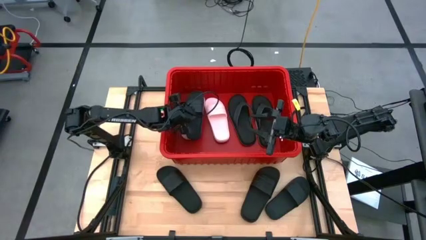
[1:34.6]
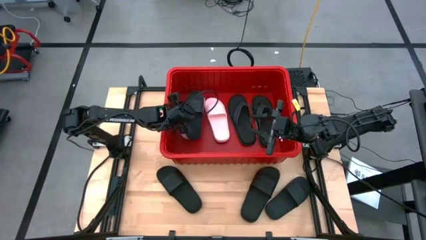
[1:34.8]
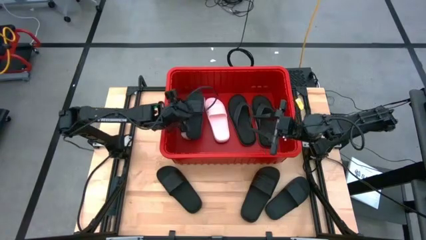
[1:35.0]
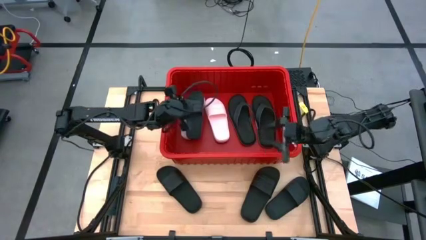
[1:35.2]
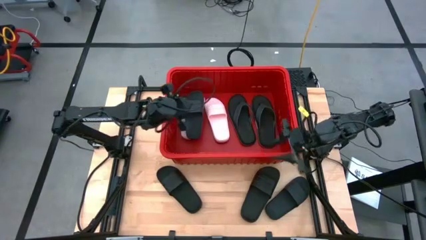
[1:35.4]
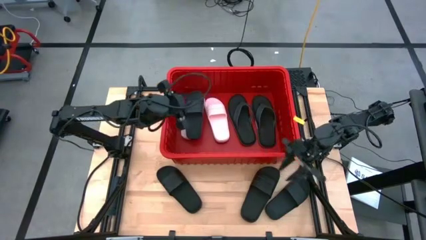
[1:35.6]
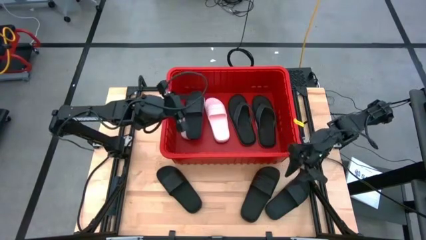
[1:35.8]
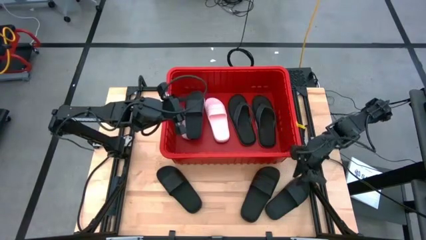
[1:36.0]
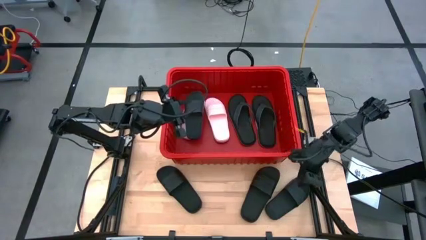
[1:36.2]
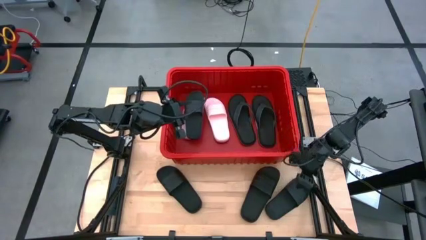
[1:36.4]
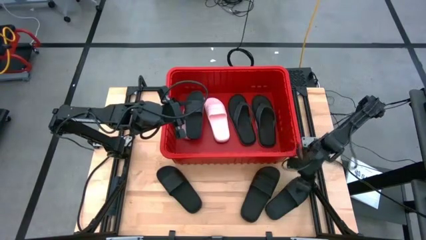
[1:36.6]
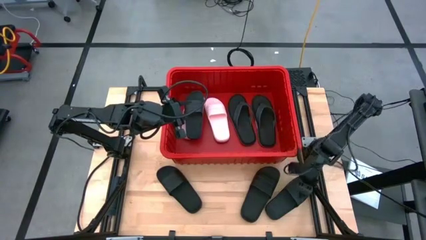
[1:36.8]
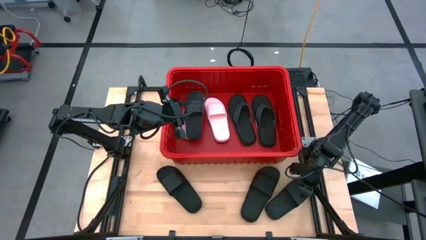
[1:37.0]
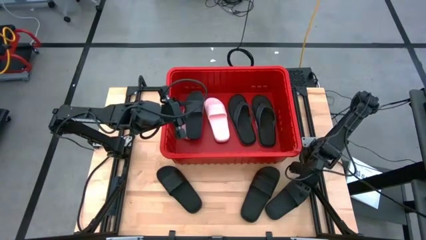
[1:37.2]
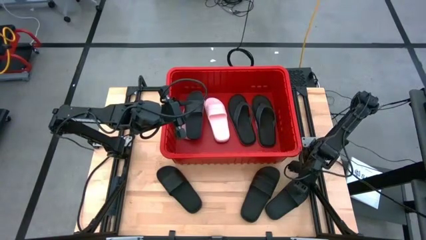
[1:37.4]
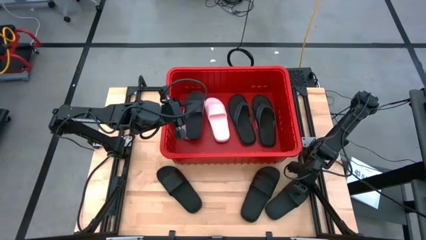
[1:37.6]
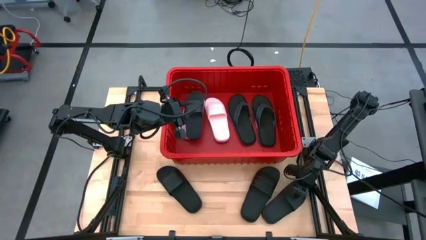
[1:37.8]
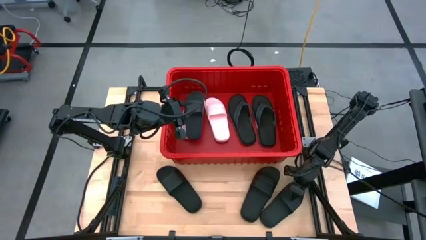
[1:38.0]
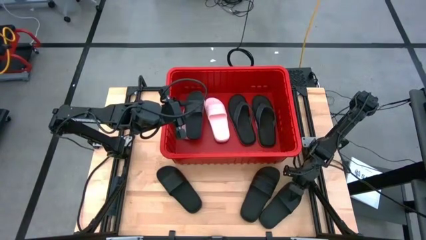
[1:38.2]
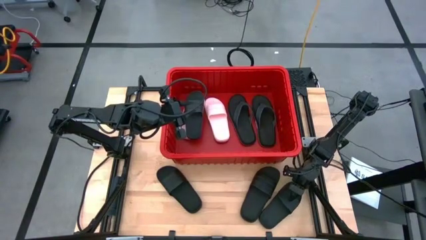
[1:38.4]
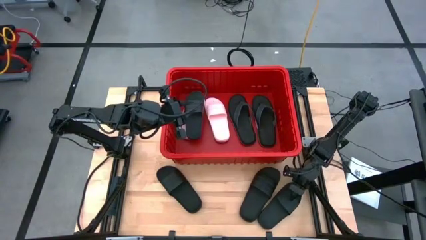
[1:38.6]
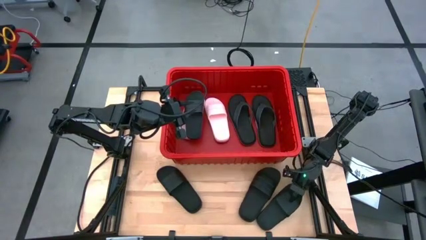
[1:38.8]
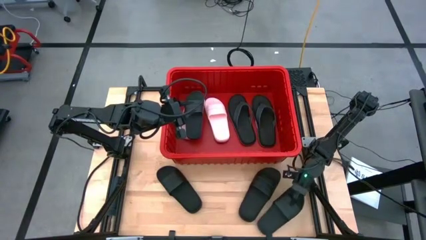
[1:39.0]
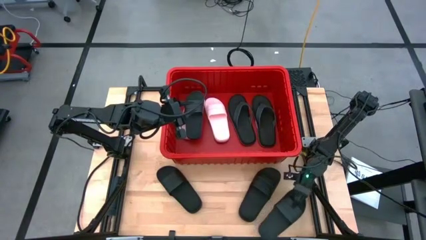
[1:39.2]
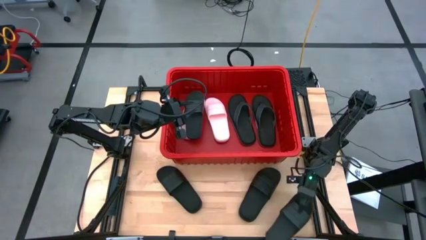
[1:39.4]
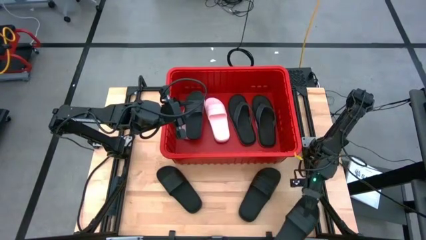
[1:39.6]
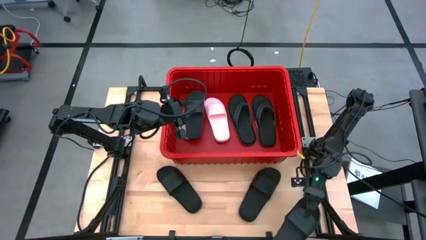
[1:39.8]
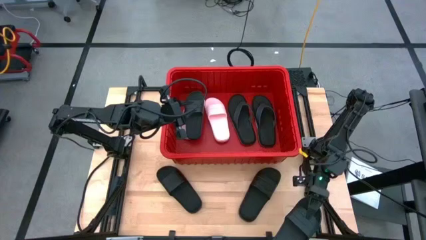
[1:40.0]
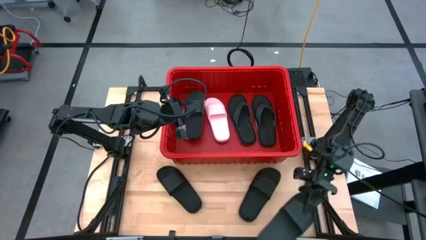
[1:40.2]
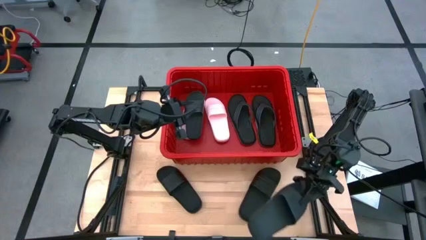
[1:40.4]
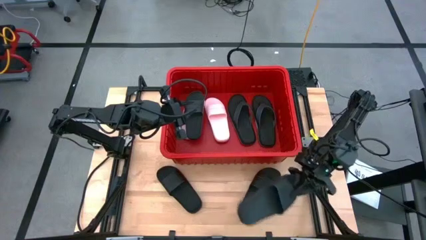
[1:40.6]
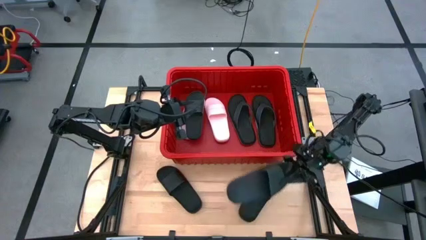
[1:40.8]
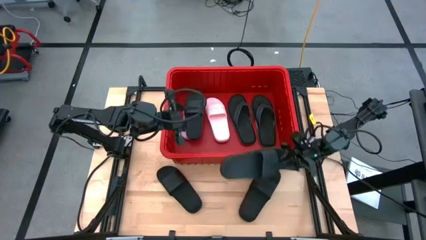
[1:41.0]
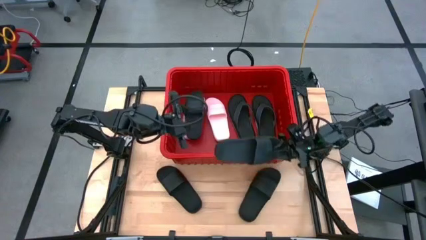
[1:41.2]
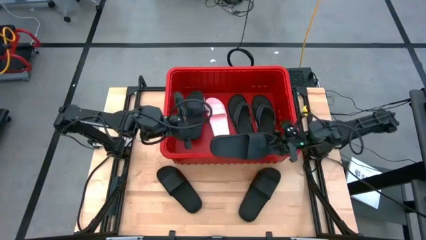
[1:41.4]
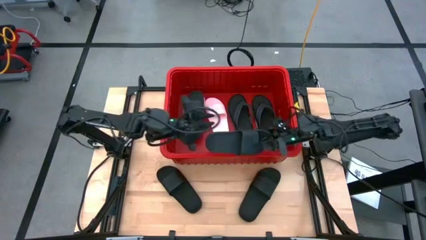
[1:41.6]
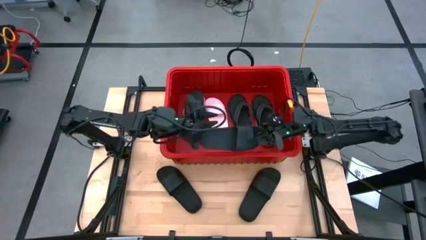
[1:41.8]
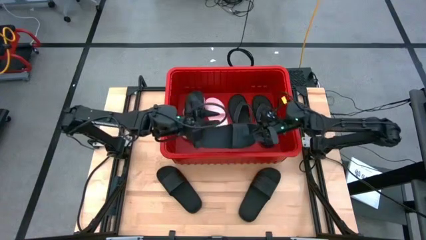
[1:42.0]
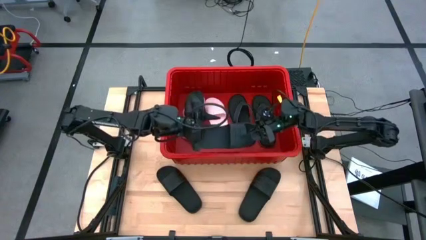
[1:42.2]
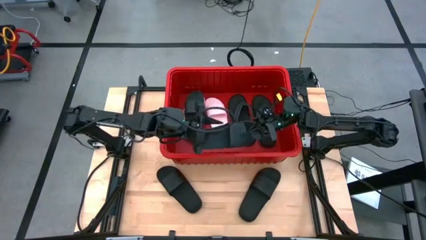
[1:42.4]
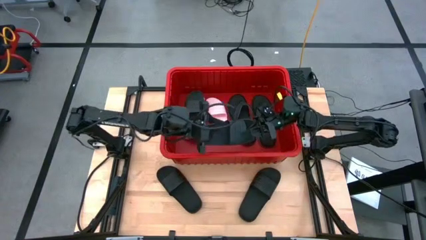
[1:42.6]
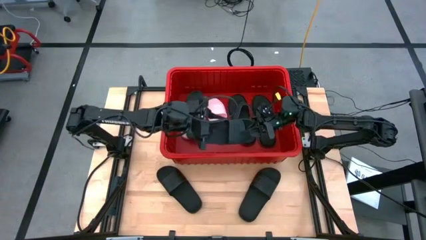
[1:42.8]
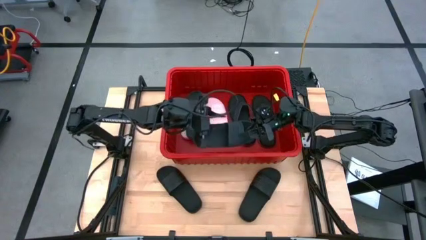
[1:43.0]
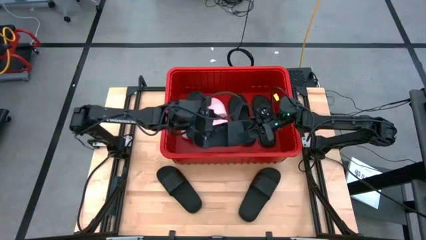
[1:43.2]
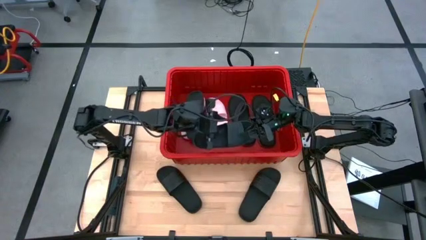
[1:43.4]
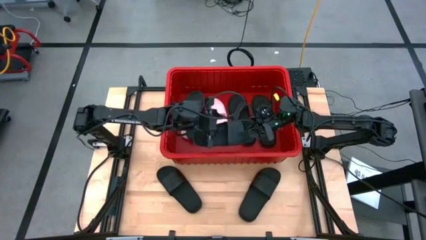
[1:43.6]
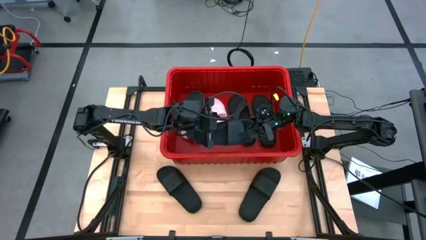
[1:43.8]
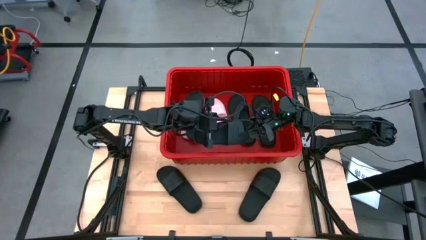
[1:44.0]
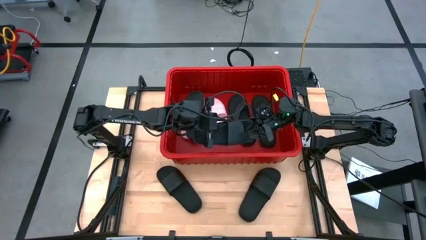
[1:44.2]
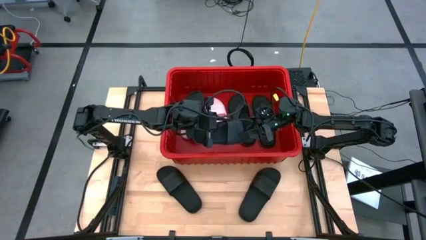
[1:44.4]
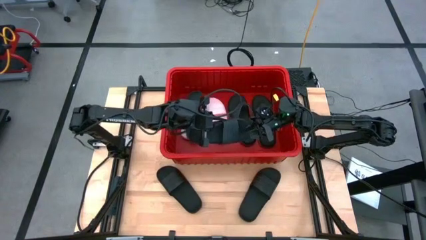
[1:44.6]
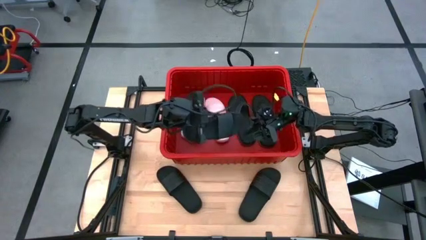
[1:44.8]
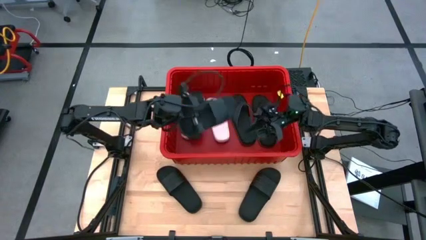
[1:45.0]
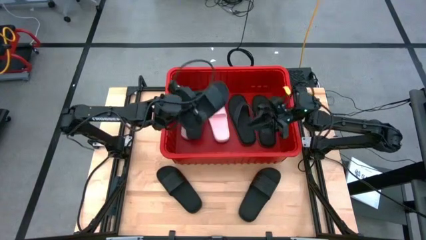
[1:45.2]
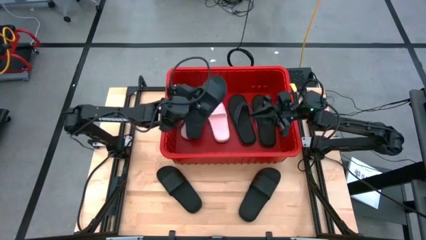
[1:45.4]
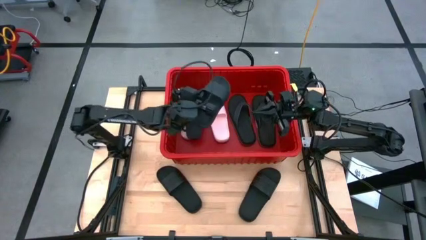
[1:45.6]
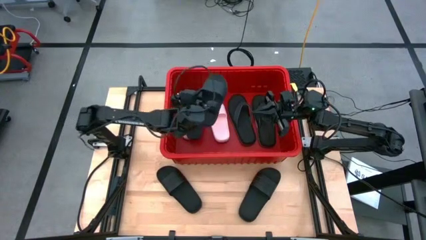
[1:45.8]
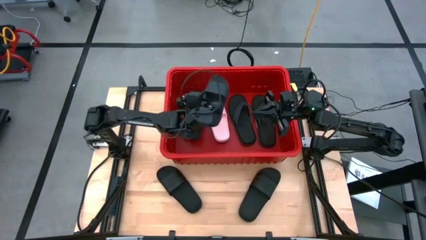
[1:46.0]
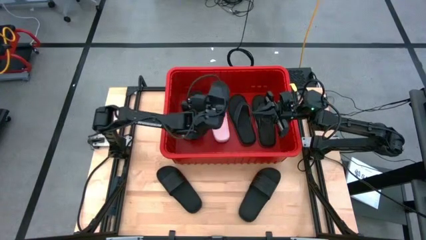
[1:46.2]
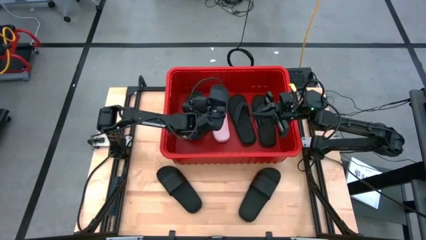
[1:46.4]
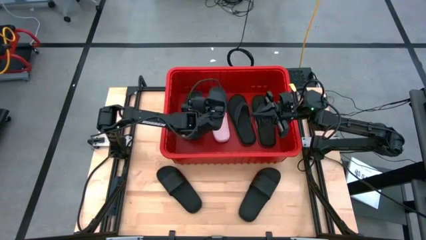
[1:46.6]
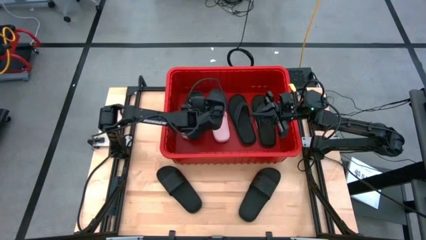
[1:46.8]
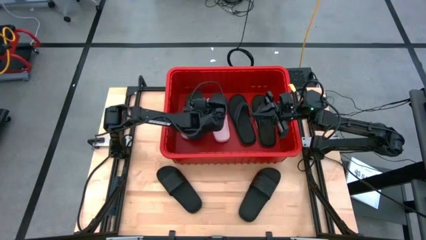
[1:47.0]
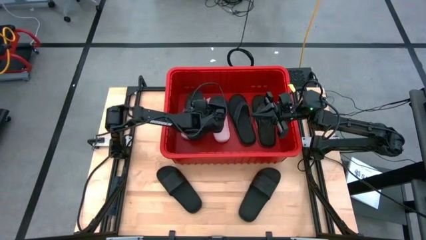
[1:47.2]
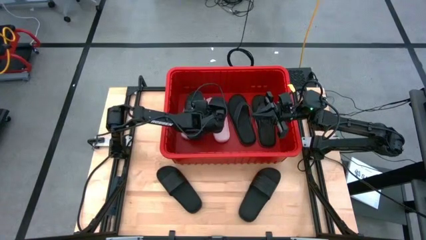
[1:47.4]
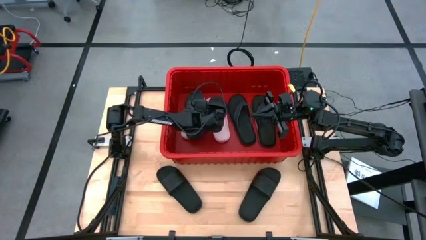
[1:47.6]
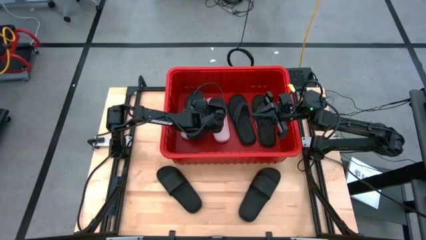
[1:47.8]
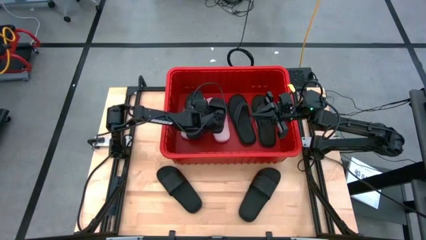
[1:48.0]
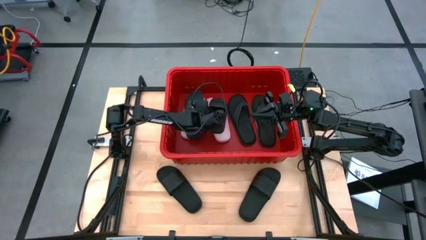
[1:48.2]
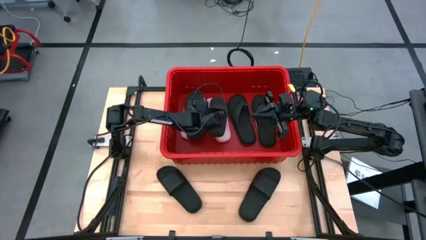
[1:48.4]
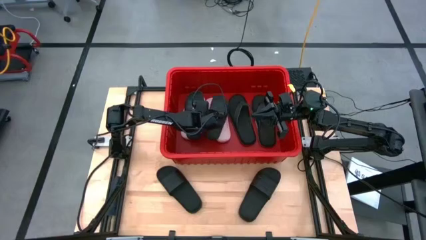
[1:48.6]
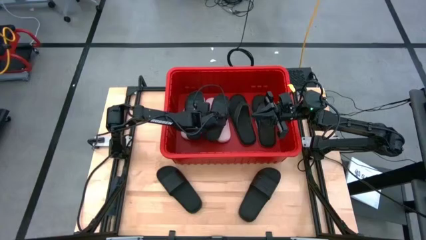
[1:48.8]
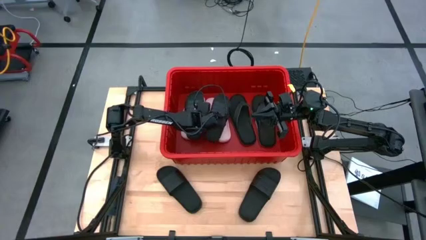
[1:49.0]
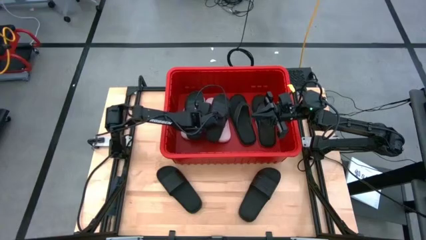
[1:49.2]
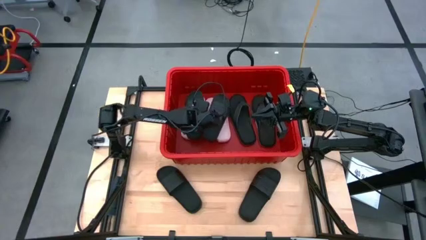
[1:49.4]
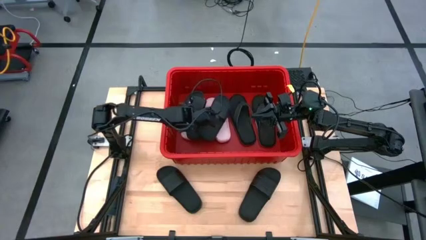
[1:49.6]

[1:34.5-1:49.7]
Task: Pick and place slides into bin
Put the black slipper into the red bin

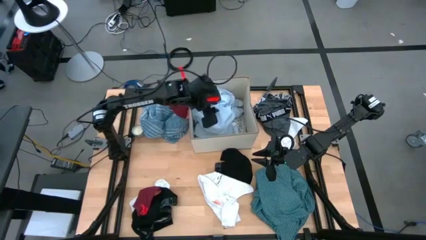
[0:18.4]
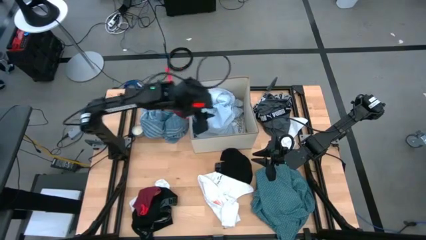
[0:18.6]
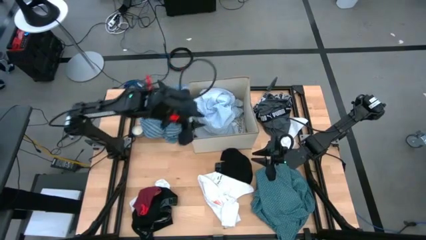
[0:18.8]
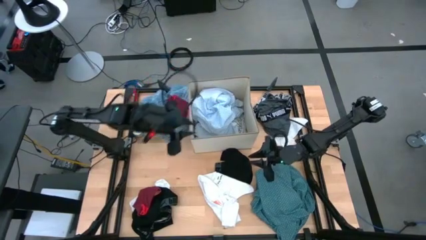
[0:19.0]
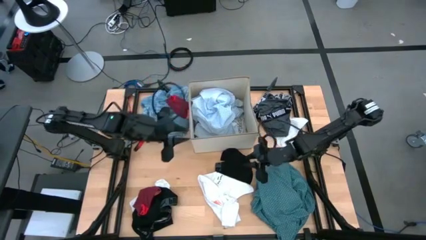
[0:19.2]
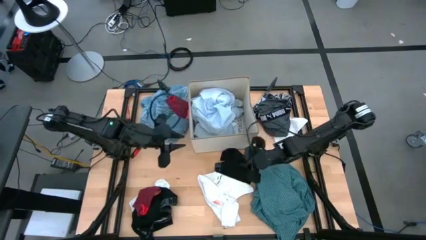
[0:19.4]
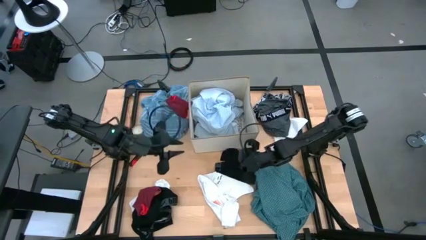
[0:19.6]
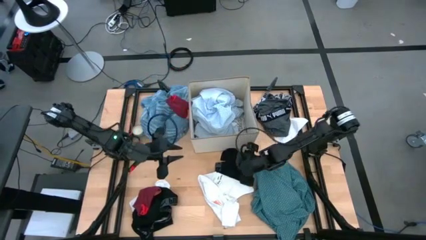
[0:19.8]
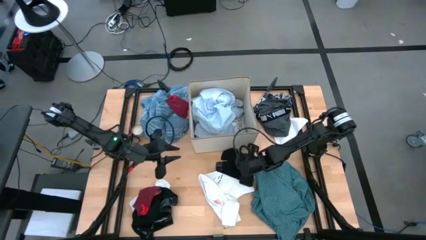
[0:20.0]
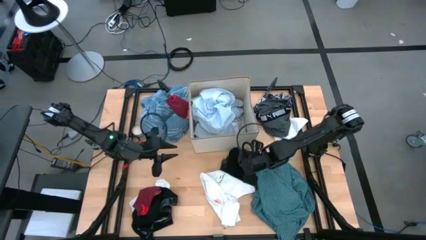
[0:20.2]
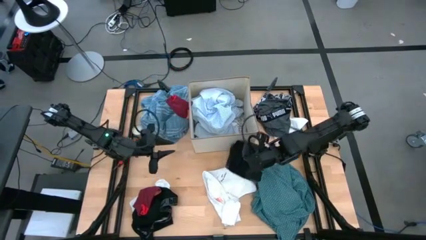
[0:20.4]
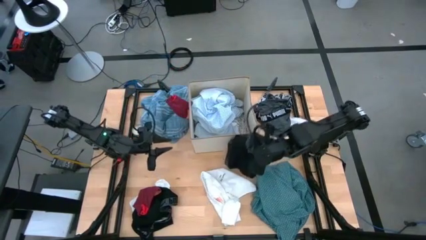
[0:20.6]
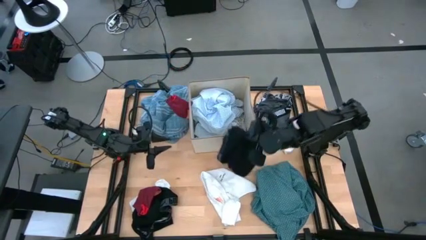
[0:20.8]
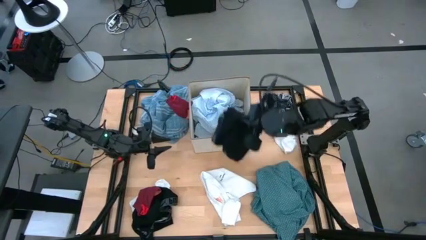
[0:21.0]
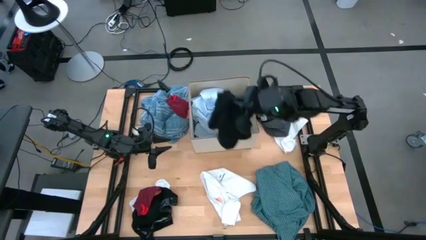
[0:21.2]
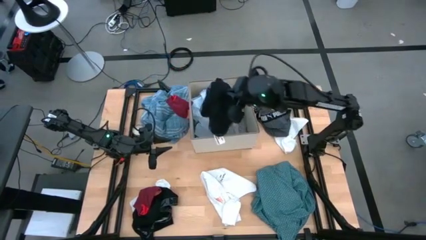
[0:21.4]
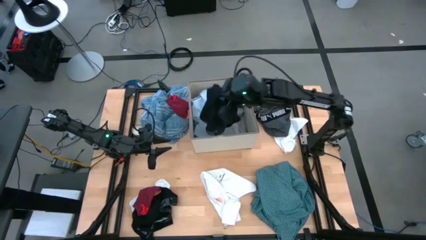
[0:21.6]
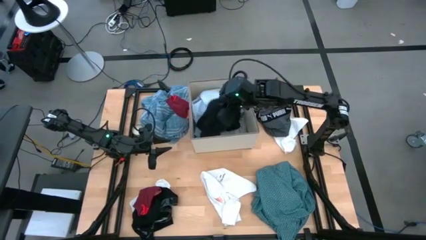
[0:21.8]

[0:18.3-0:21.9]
Task: Sort clothes
Put the right black boxer into the bin
